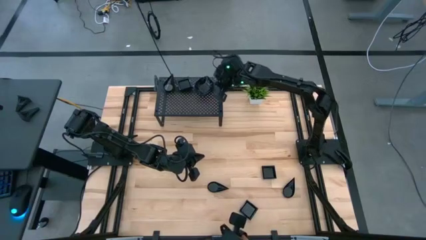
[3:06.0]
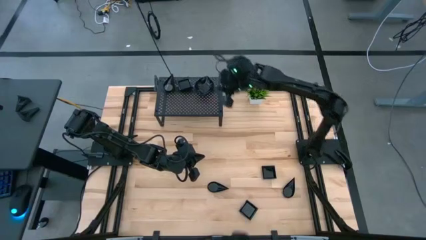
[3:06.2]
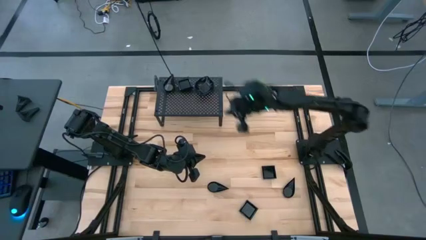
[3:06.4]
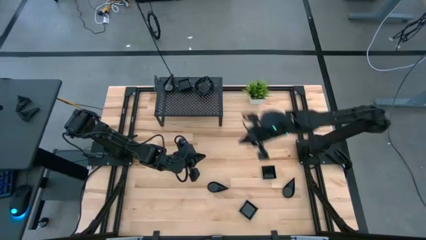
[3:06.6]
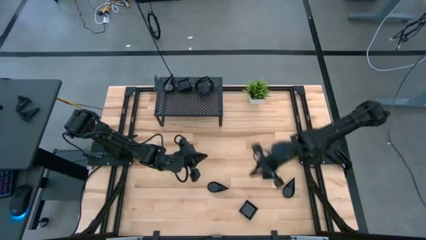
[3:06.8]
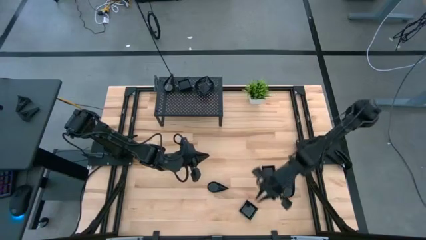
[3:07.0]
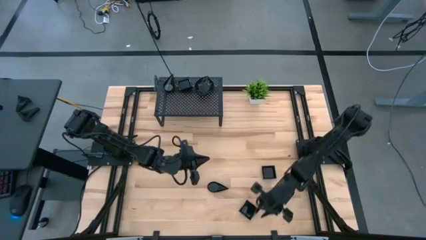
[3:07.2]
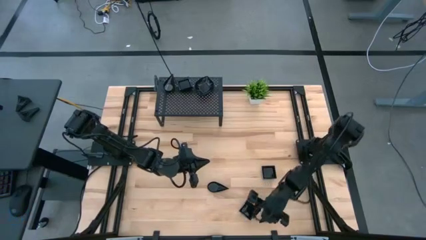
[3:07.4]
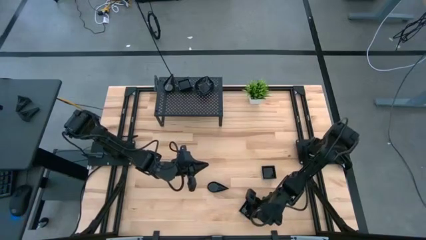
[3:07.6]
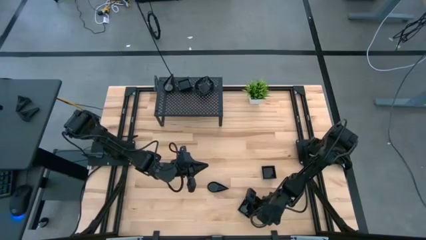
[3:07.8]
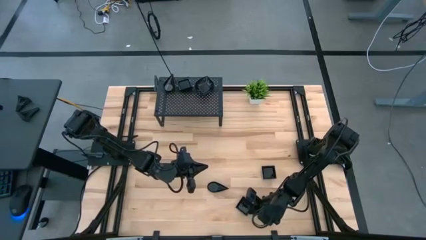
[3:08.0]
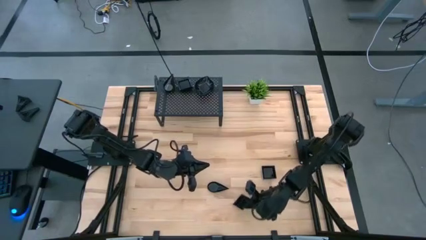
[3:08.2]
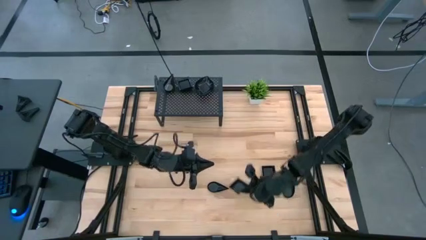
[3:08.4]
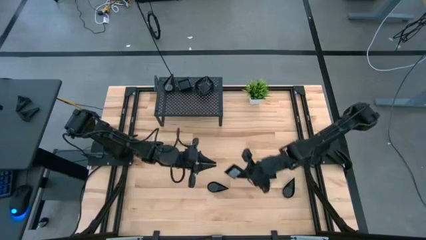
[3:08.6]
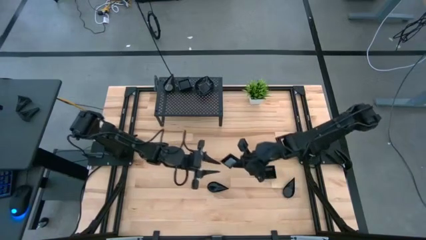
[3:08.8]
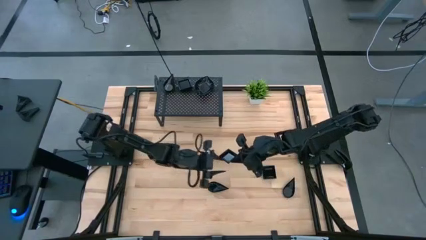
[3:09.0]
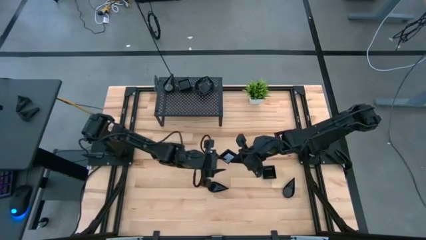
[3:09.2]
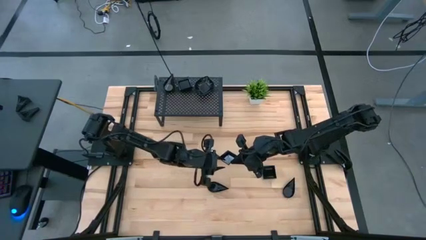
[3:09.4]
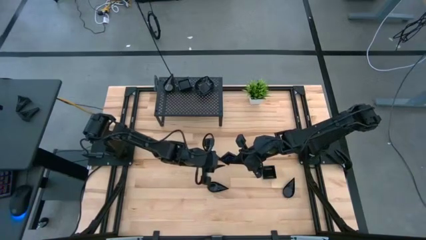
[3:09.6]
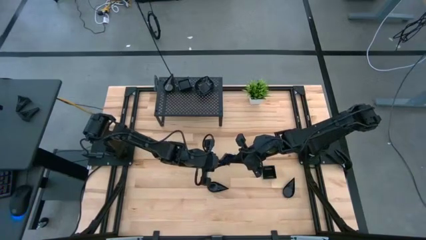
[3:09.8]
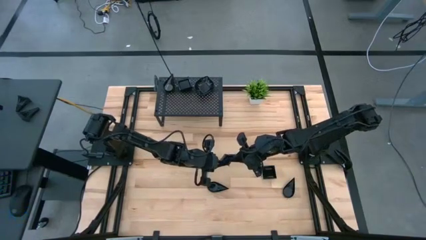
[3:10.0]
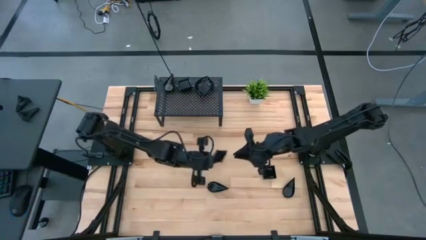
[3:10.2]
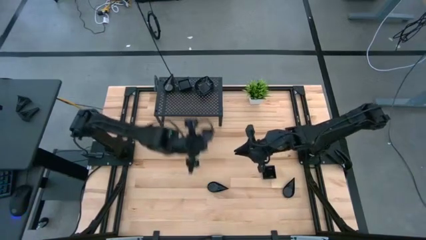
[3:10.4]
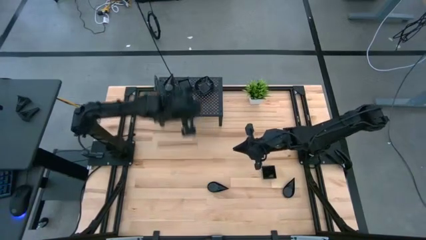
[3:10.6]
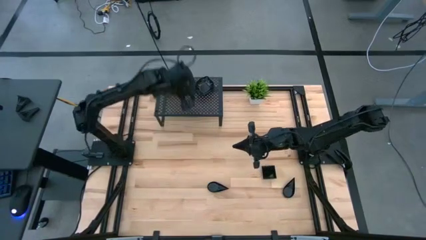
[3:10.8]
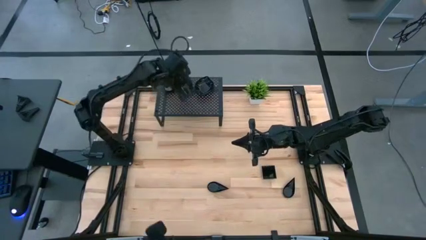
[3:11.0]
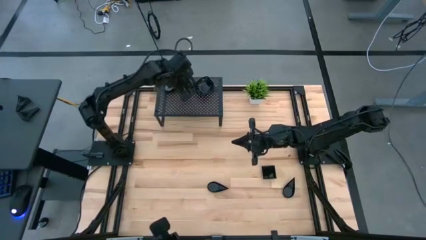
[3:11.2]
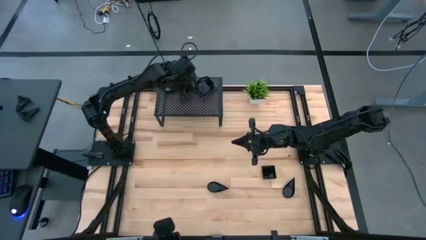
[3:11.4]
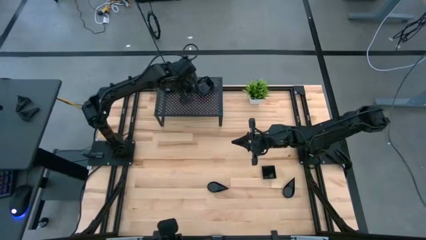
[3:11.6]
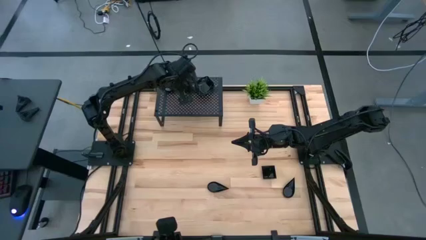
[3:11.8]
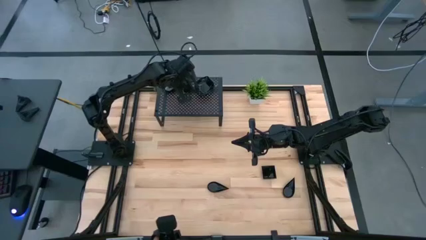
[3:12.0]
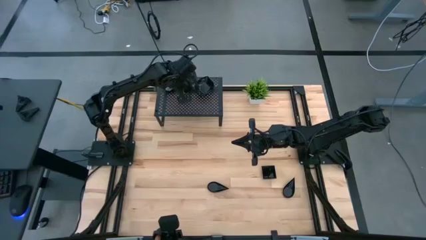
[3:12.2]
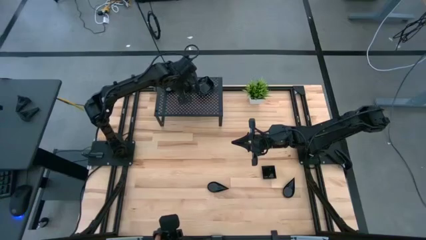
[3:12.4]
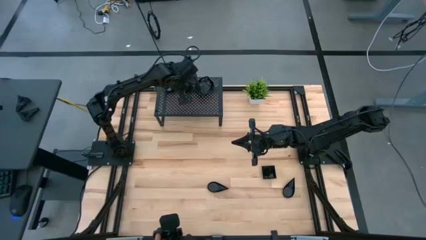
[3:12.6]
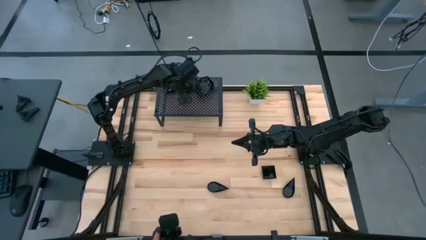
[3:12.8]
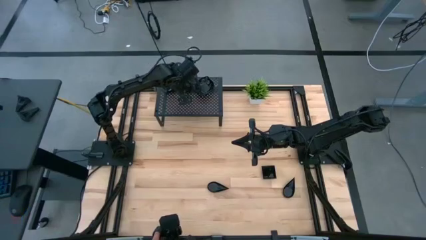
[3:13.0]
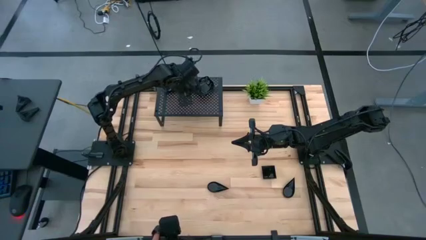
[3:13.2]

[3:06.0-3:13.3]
Task: Pick & Place Mini shaped plates
Stack the black square plate on top of the square plate on the shelf

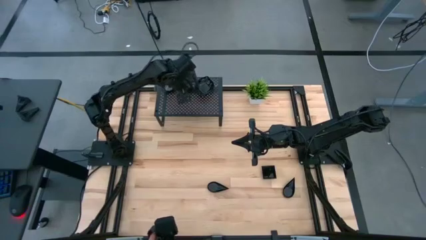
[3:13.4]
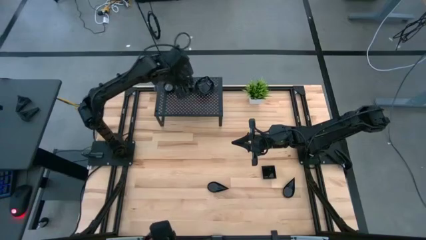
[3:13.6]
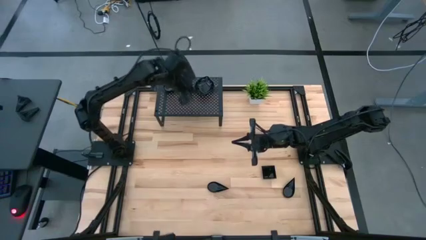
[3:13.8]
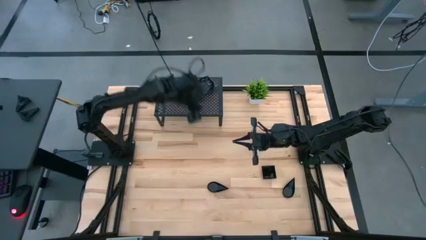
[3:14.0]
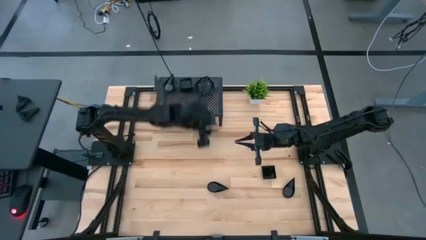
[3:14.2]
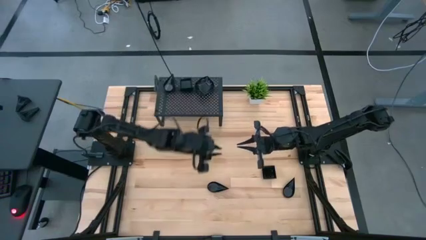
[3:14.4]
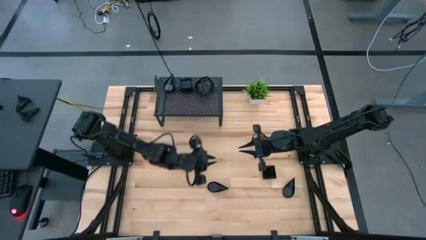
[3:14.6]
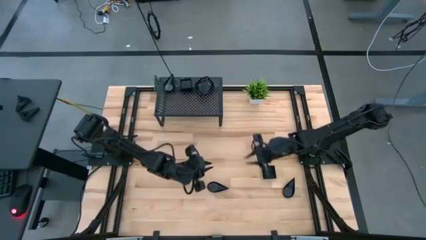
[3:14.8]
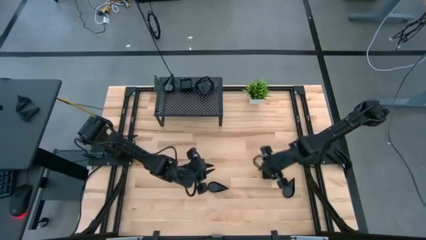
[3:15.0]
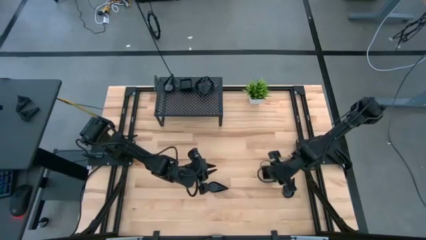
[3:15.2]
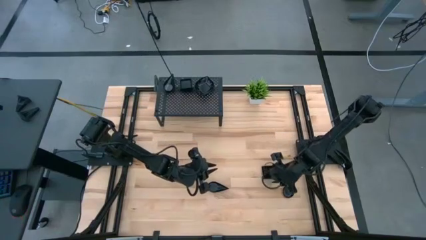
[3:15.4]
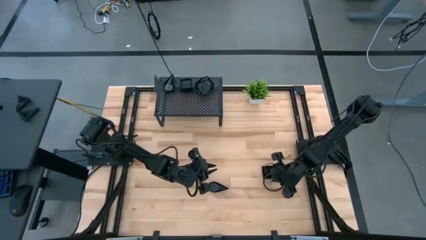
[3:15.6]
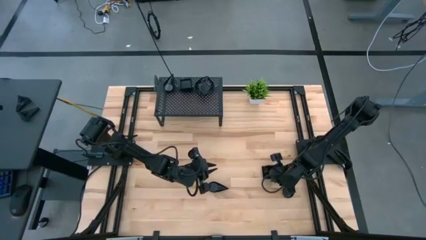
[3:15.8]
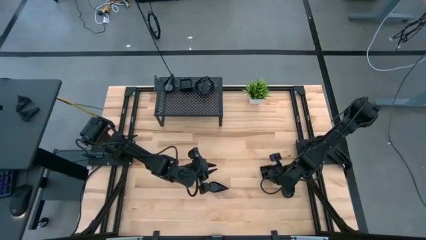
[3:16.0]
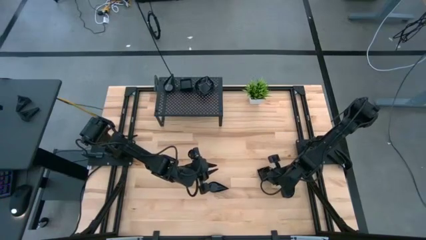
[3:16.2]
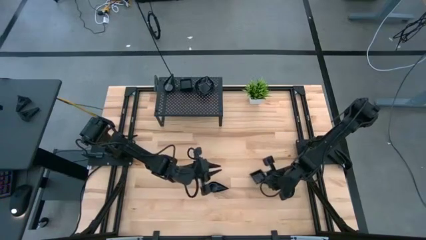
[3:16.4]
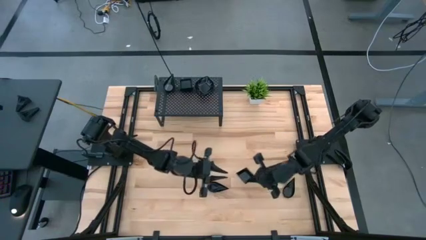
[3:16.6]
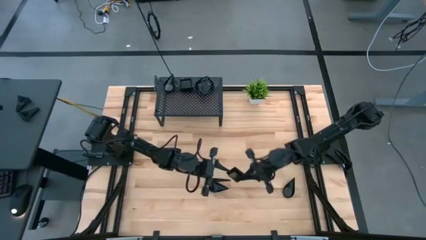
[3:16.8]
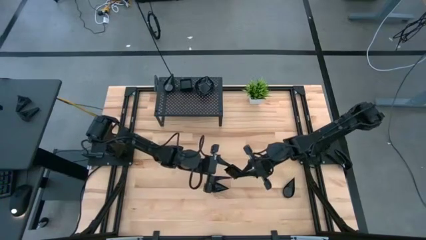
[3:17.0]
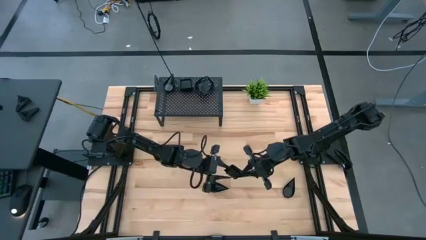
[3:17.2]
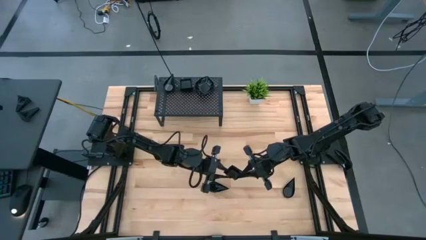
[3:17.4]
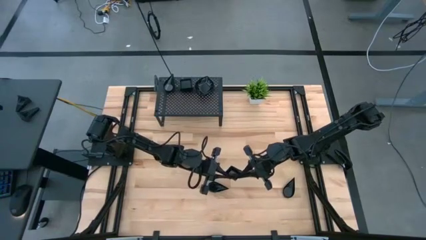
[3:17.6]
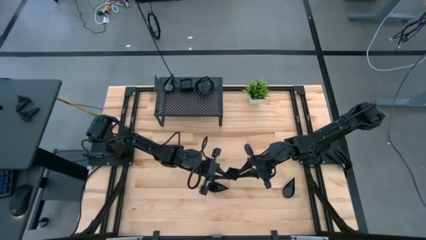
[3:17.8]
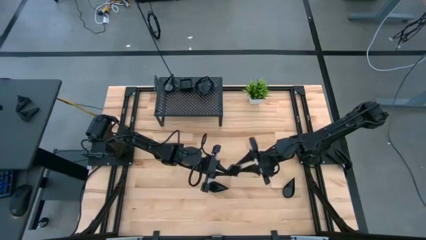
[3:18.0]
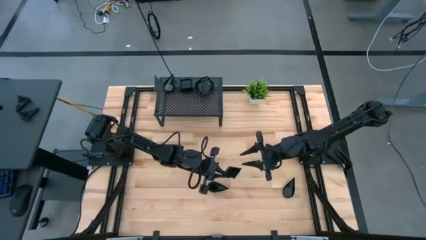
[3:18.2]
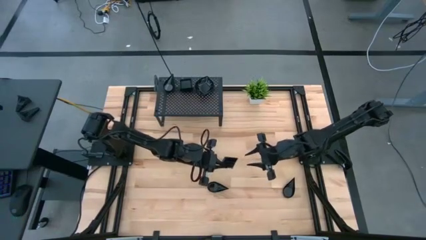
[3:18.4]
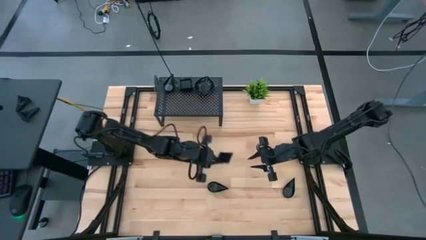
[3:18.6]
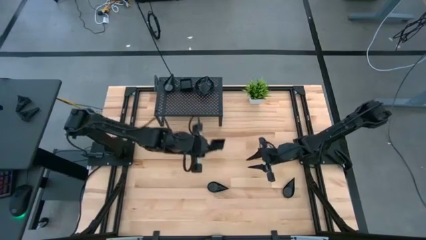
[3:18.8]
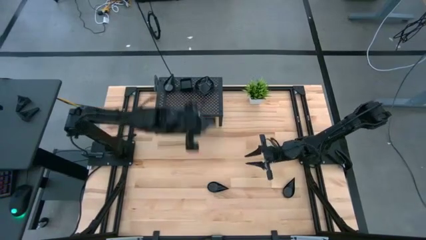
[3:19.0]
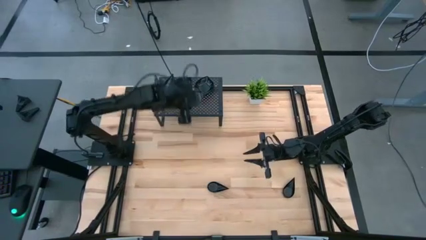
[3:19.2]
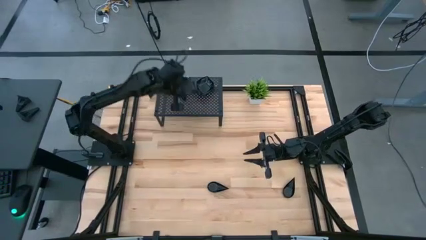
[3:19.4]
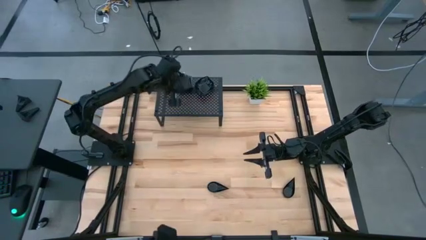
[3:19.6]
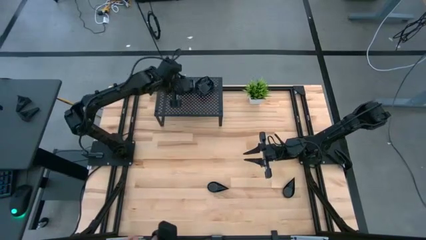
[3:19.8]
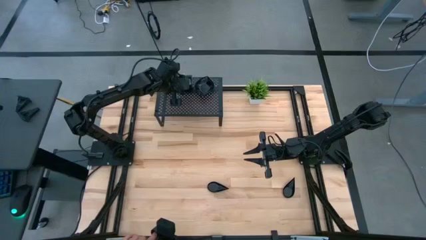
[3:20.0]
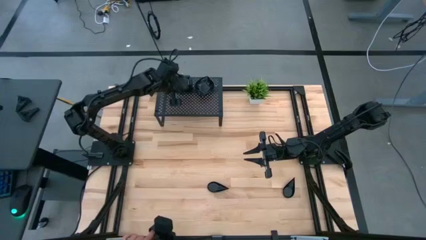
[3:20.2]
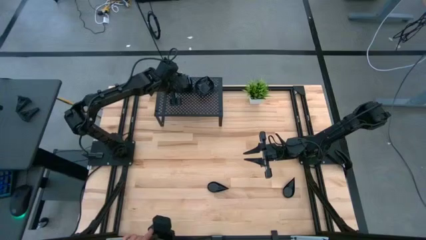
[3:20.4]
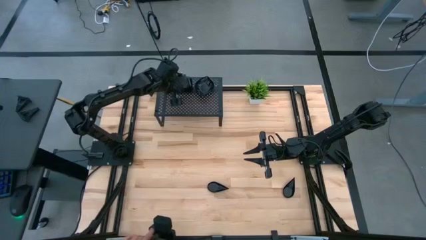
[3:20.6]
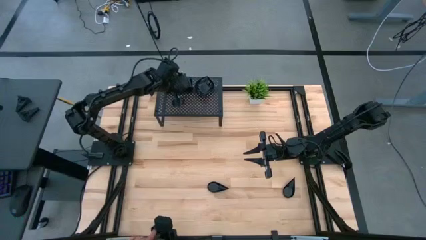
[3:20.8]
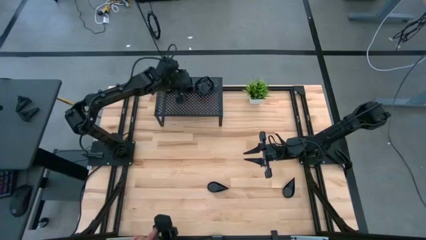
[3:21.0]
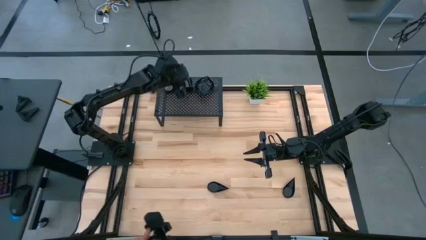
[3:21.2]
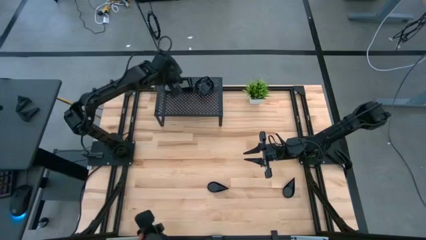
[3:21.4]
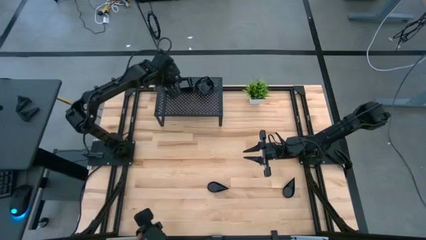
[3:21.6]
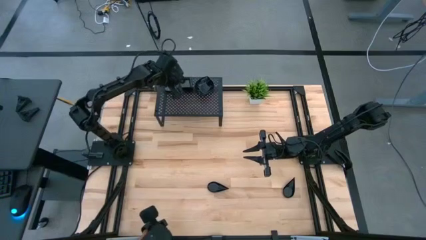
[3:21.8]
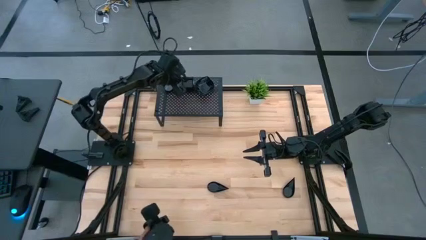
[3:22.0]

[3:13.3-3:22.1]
Stack the black square plate on top of the square plate on the shelf

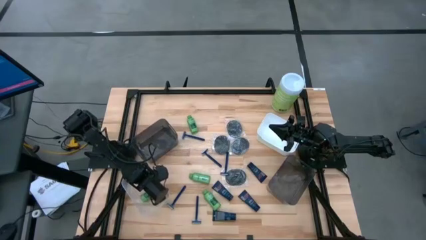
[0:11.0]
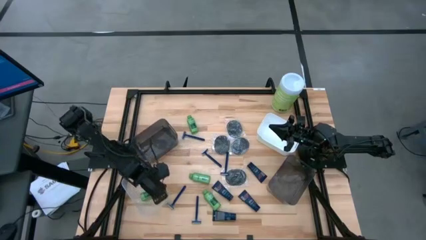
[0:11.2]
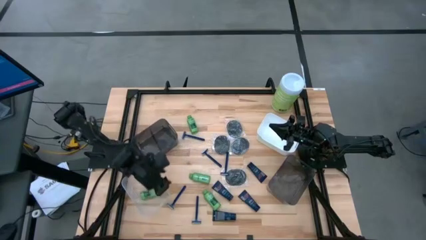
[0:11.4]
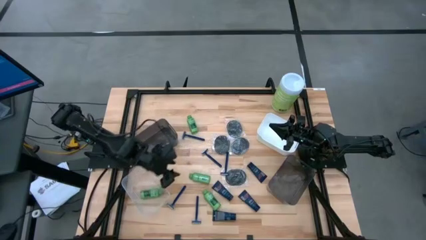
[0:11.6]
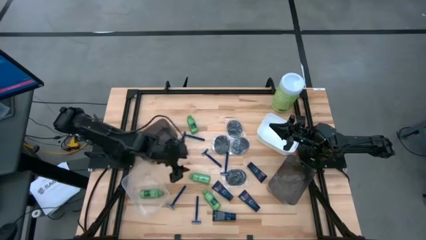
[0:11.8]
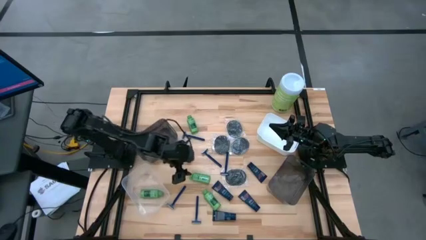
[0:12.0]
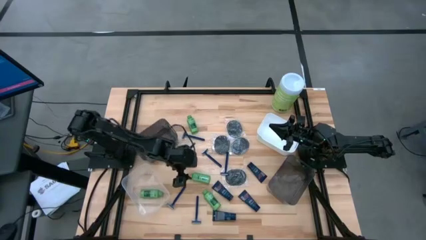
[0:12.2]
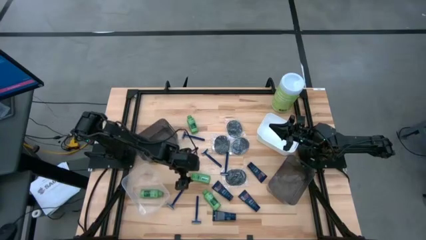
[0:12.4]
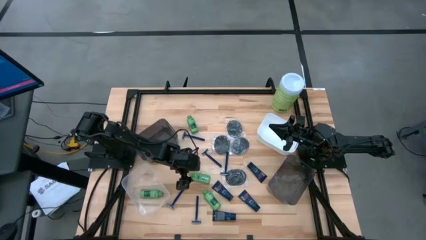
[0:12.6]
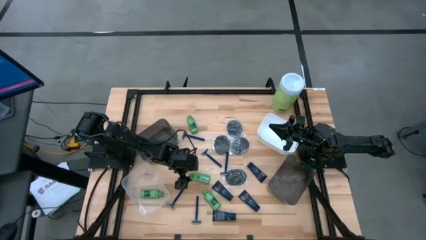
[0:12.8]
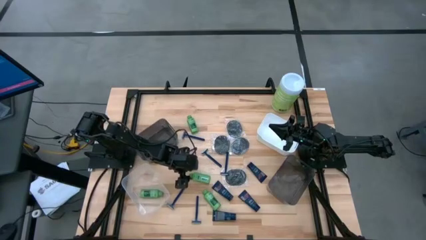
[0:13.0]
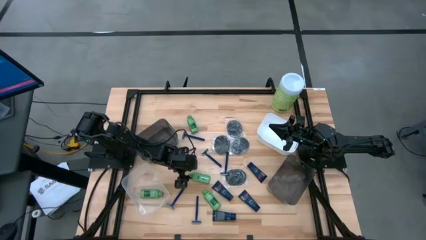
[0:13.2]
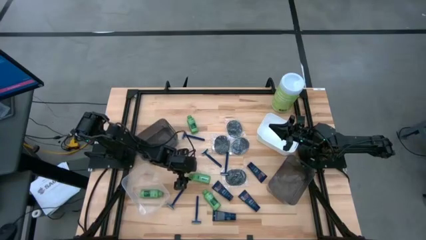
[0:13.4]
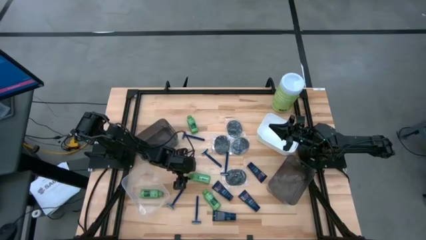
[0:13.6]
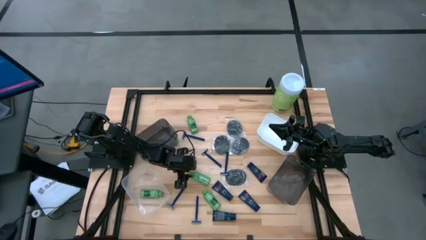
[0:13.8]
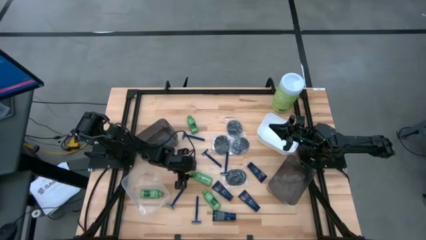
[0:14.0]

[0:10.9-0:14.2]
Task: Pick & Place Travel size toiletries
Put the green shampoo into the transparent bin
